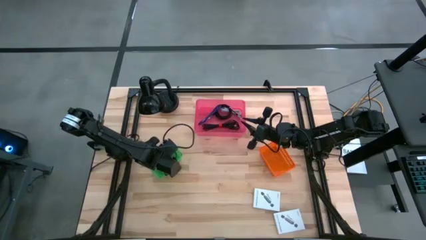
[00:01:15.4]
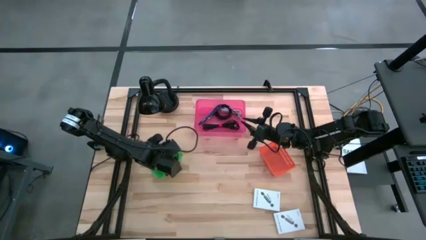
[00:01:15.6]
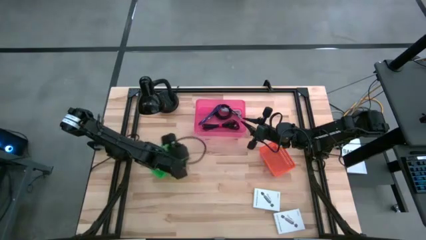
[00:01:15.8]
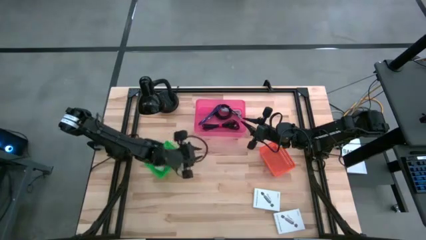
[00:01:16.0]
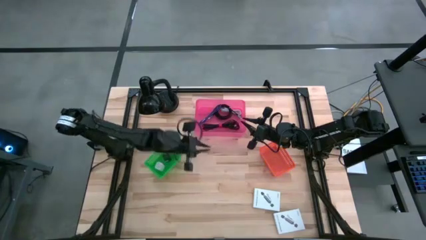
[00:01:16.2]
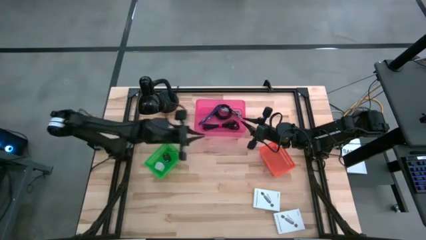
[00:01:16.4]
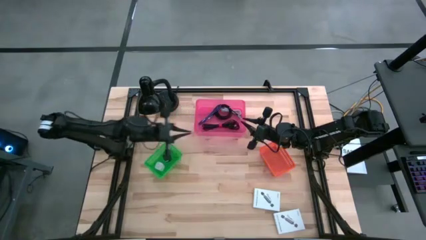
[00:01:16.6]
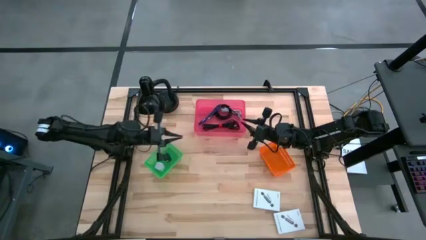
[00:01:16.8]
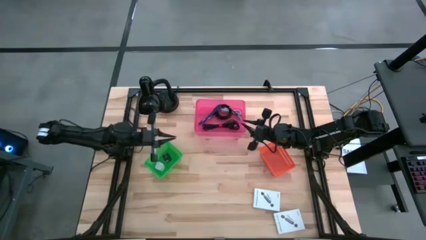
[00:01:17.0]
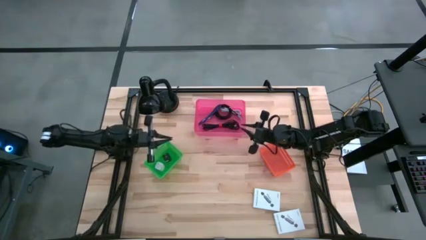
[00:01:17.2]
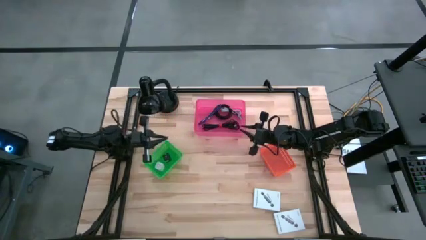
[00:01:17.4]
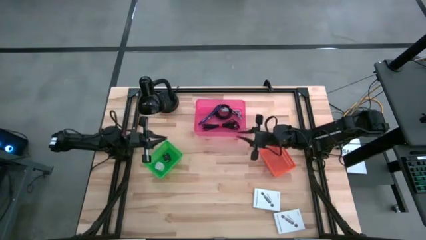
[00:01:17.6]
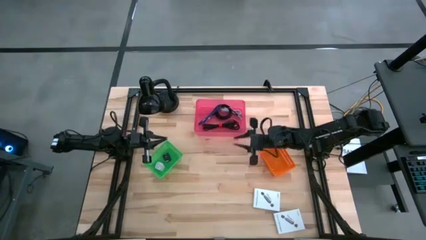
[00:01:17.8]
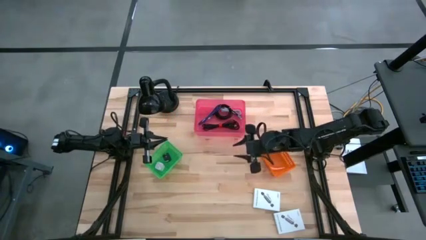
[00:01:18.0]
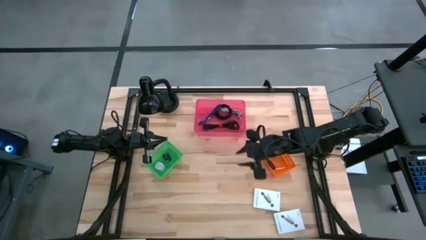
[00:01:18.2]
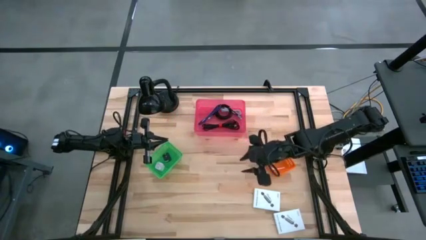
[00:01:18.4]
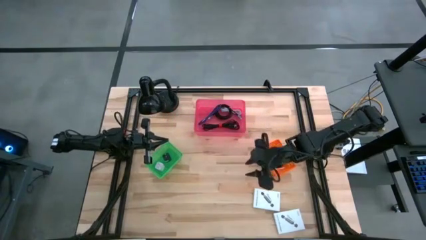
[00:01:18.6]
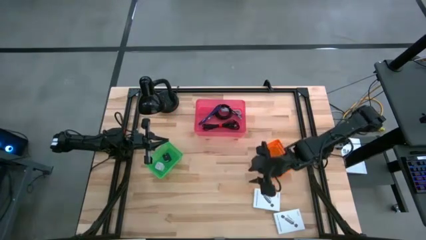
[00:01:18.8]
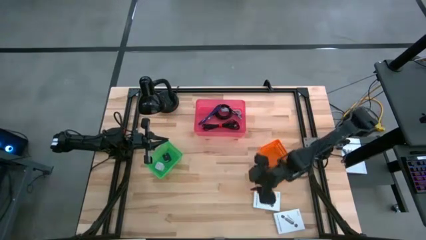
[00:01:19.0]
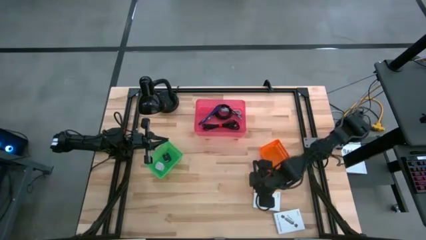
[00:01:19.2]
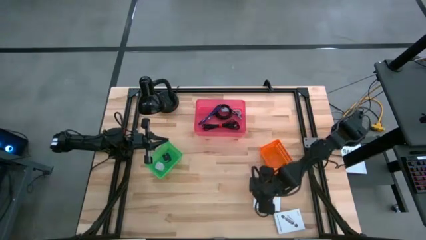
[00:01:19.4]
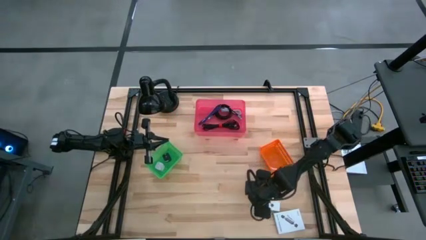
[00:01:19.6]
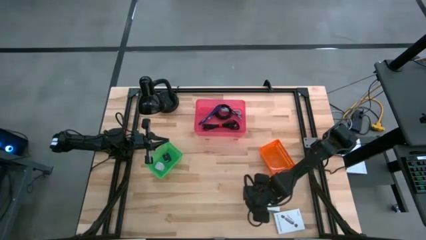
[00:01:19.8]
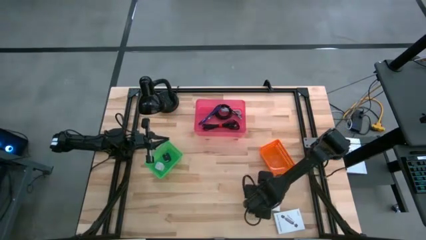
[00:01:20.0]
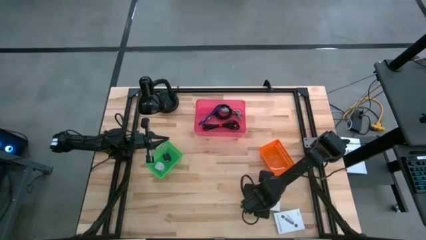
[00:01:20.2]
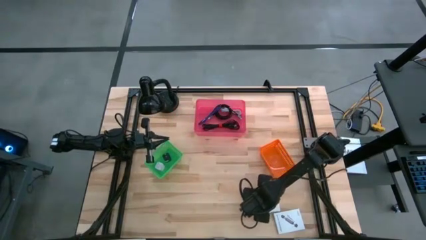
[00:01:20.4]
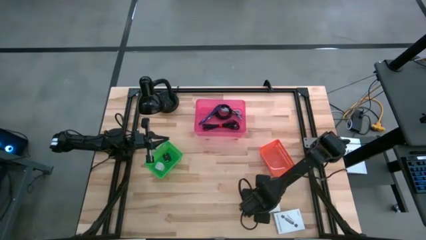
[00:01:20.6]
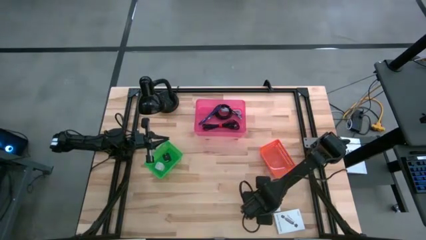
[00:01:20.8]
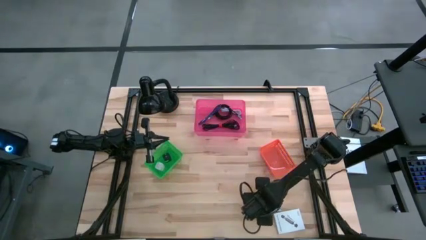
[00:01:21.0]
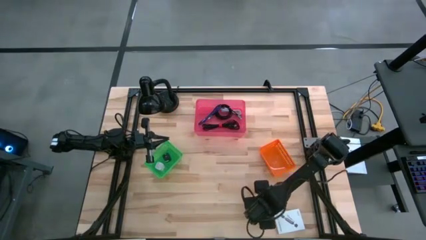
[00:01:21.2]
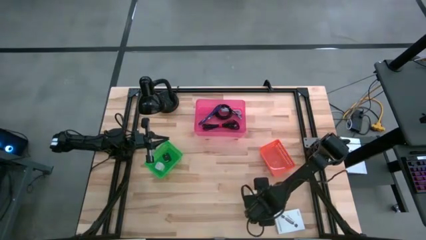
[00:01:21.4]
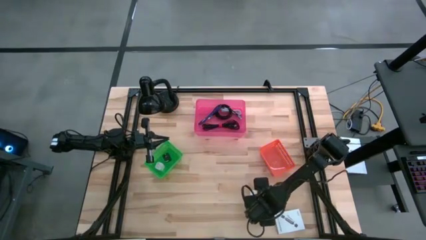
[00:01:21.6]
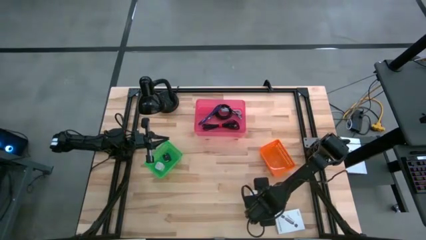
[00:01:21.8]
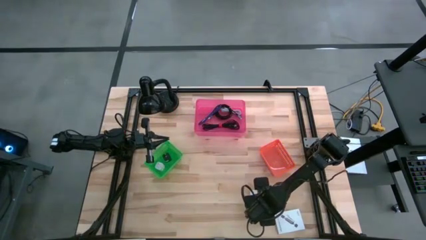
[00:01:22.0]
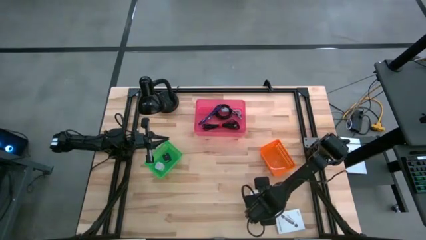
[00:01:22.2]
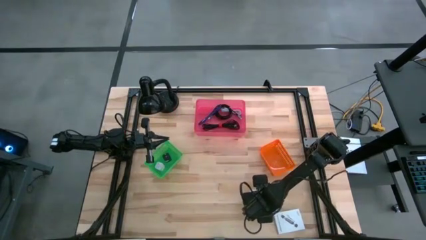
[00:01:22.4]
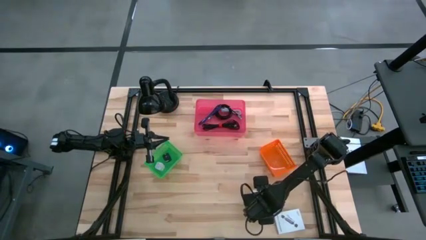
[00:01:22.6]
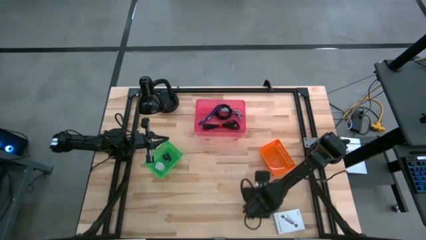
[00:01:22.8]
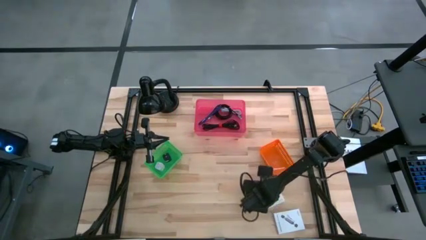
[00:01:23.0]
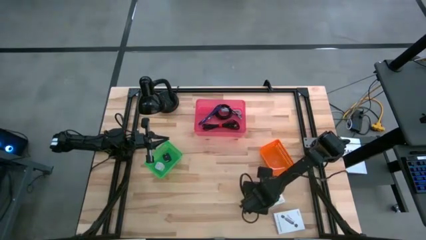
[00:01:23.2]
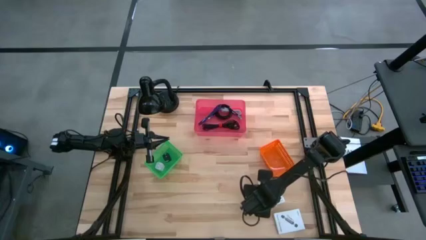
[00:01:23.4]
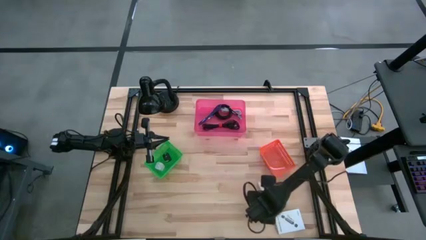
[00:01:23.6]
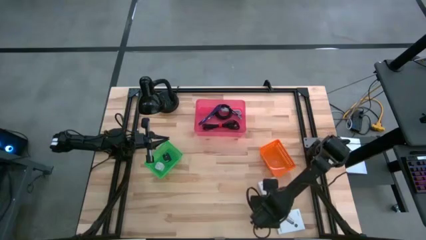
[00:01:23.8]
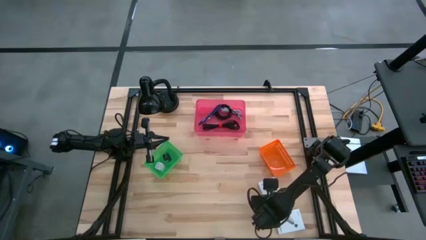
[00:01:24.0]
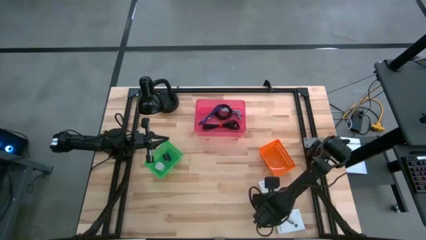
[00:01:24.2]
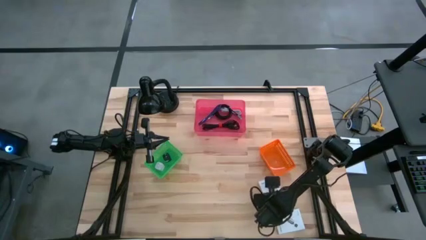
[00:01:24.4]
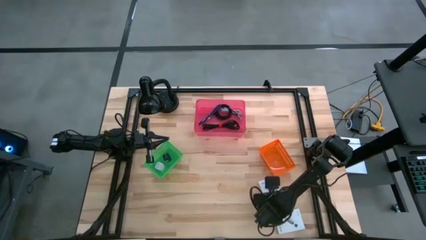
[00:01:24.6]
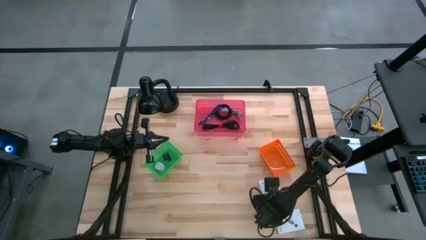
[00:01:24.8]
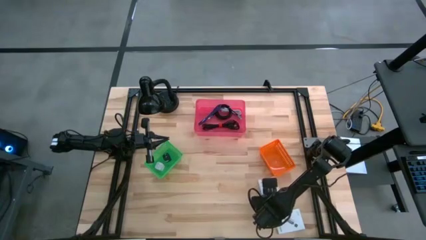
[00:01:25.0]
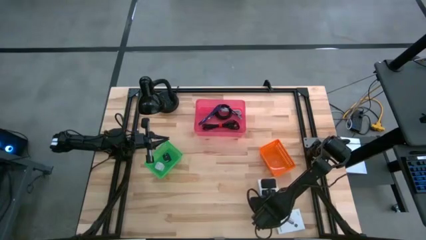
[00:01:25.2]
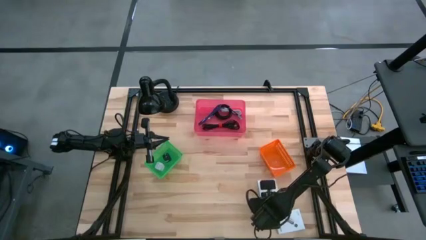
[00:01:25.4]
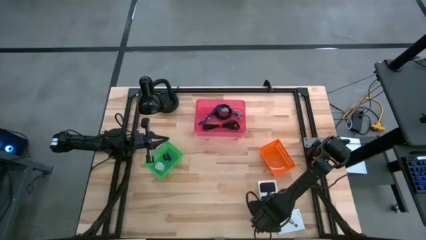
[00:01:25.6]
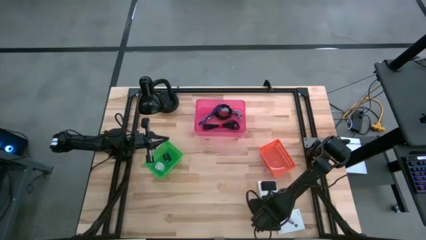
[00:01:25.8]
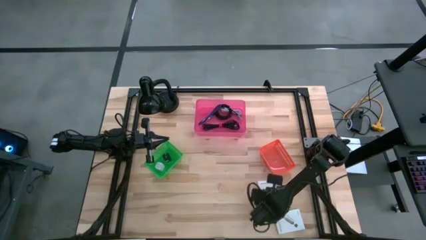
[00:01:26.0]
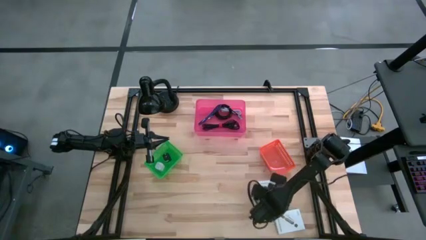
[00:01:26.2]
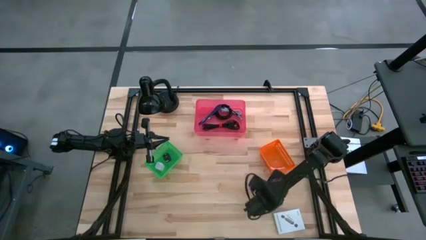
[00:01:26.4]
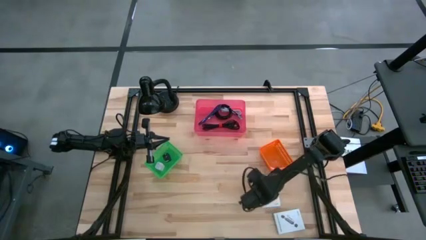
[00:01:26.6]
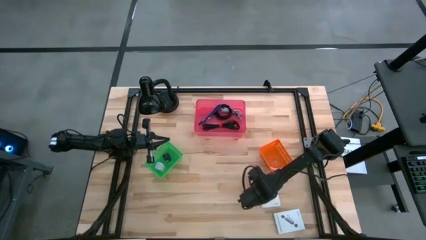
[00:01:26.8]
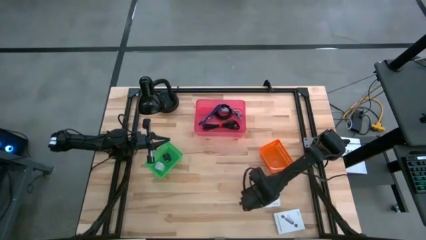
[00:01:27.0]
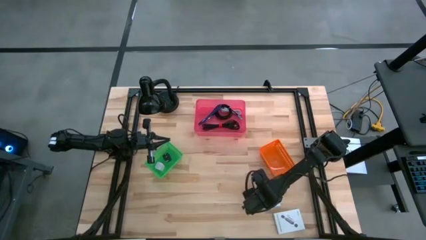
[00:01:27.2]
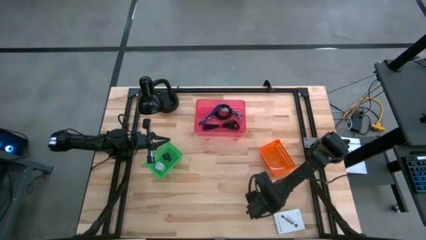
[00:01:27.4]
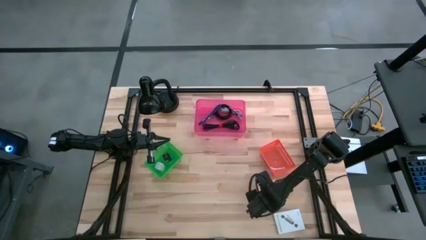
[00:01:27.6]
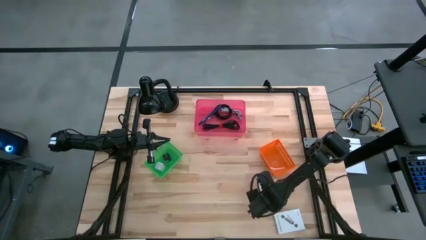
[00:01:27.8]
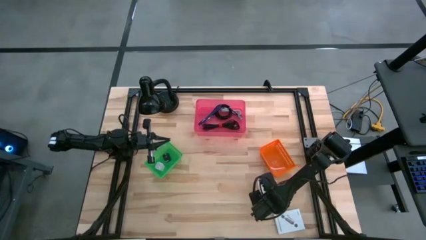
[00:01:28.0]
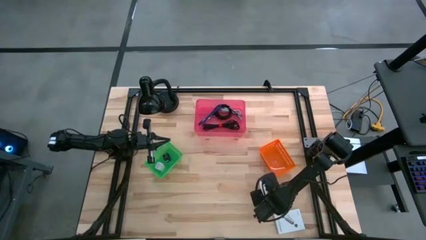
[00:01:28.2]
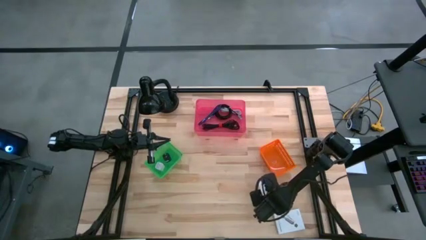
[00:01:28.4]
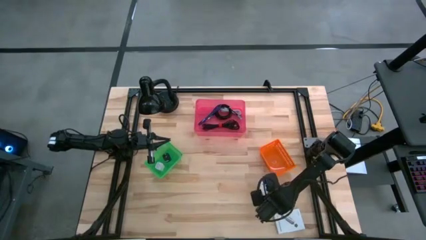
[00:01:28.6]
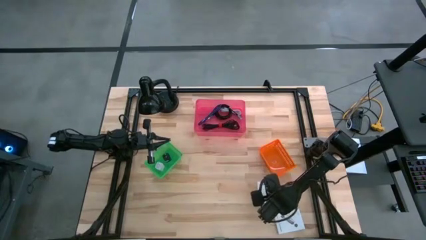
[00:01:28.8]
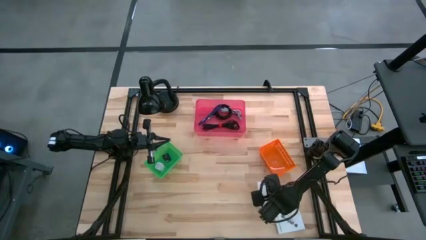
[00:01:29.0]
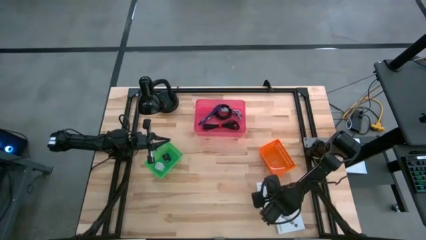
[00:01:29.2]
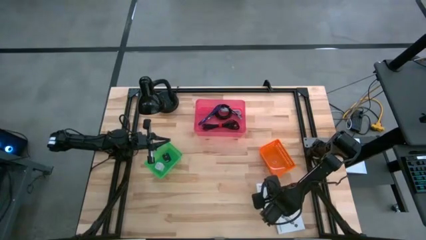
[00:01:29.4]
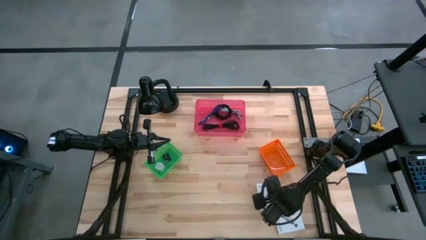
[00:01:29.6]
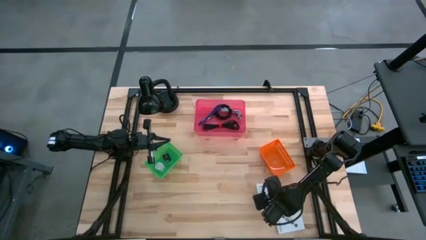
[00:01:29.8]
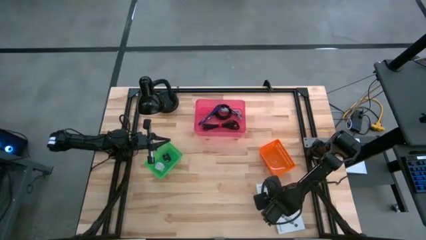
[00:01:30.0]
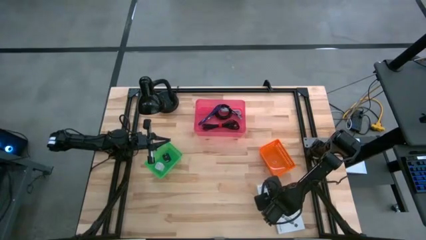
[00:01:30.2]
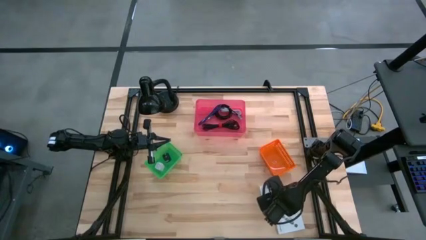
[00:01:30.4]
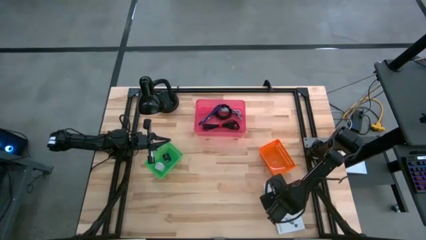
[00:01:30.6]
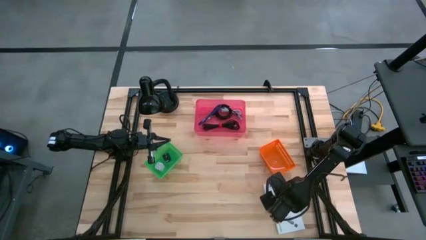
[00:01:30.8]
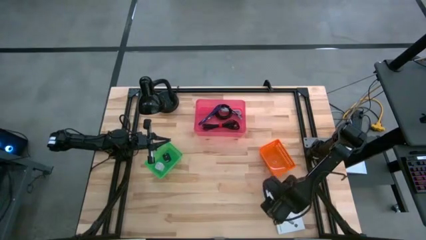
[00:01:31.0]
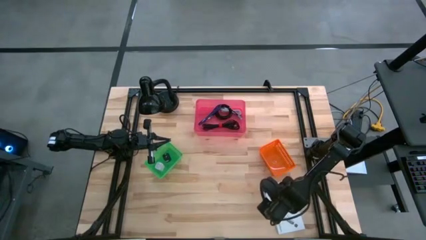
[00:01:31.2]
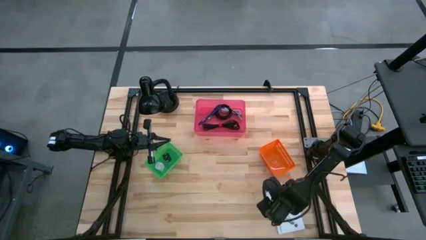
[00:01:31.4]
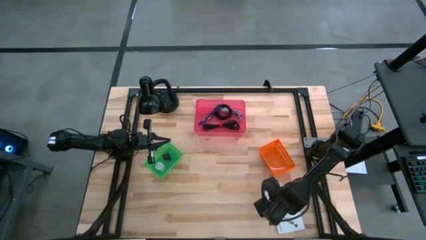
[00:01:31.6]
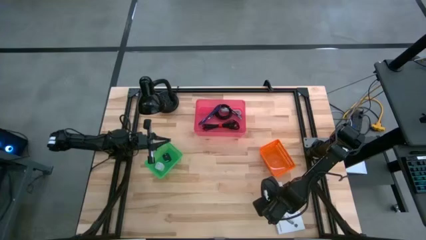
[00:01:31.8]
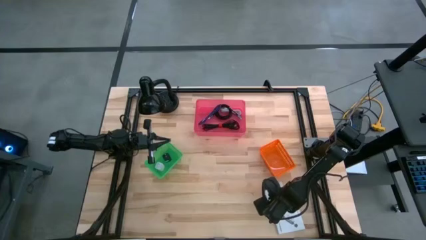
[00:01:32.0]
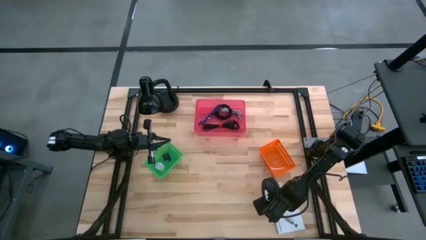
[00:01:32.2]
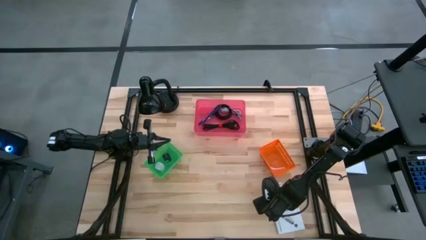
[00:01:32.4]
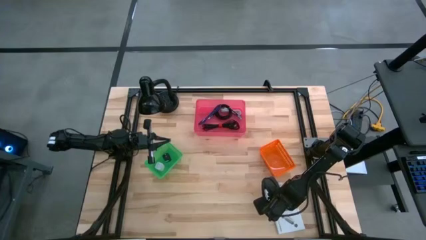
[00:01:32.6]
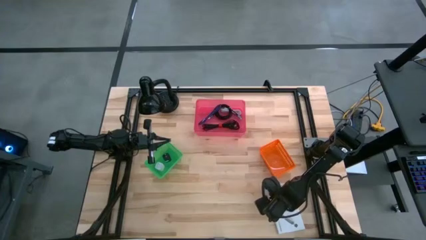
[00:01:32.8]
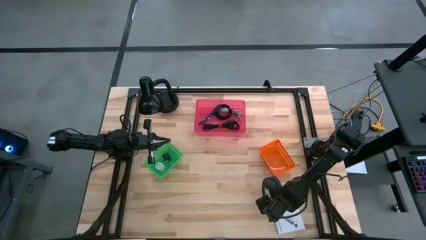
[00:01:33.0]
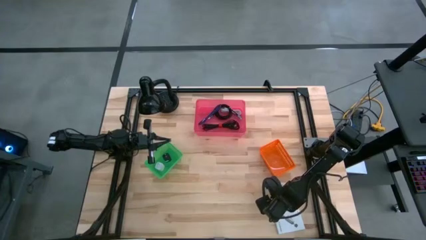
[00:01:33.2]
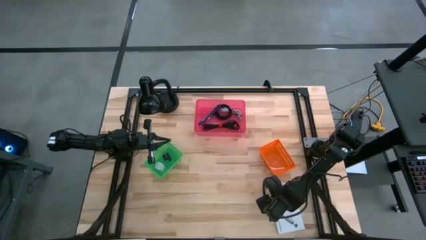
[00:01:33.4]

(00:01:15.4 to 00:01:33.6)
Task: Pick and place items into bin
Put the top card reader box into the orange bin
